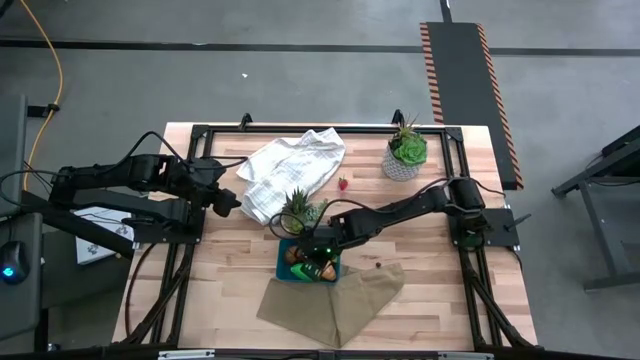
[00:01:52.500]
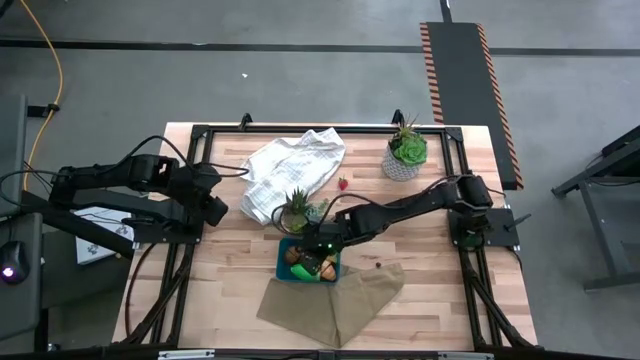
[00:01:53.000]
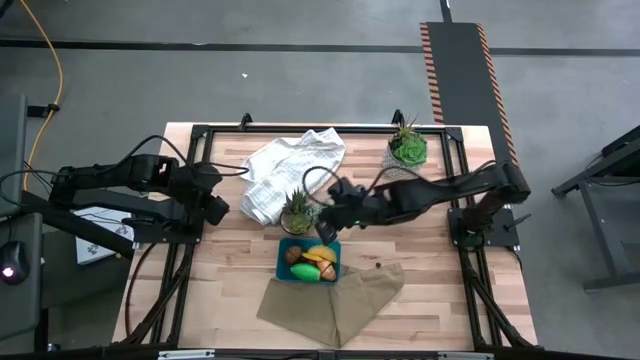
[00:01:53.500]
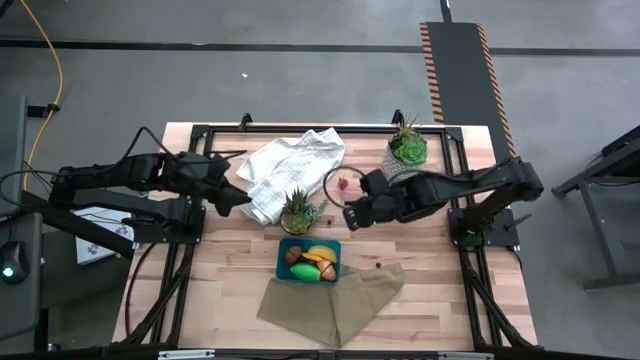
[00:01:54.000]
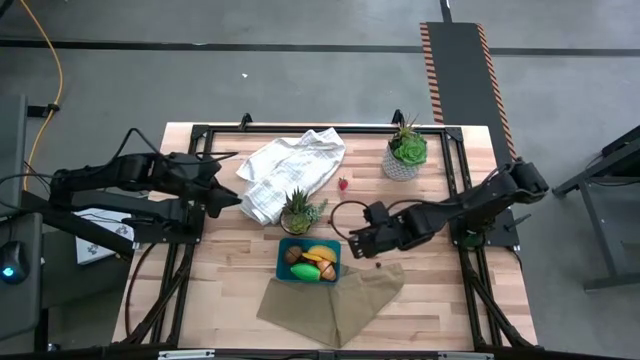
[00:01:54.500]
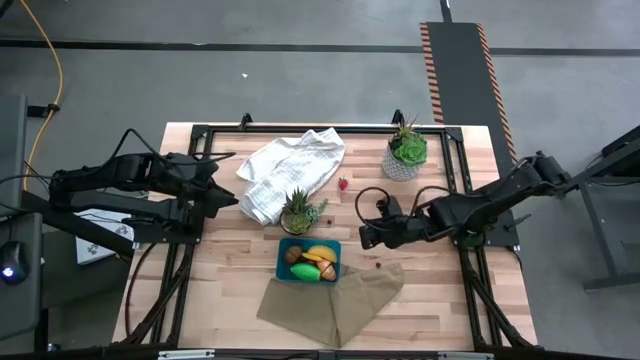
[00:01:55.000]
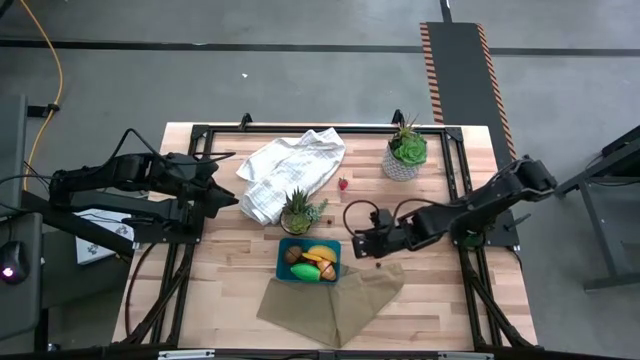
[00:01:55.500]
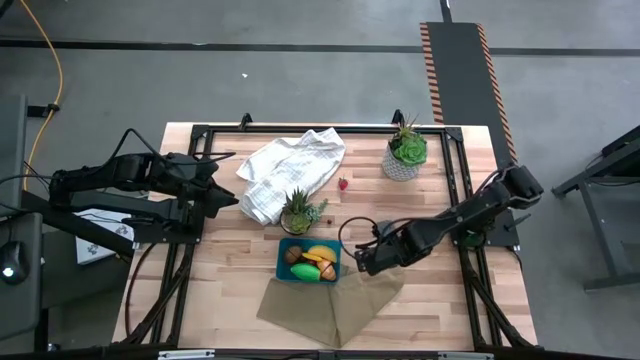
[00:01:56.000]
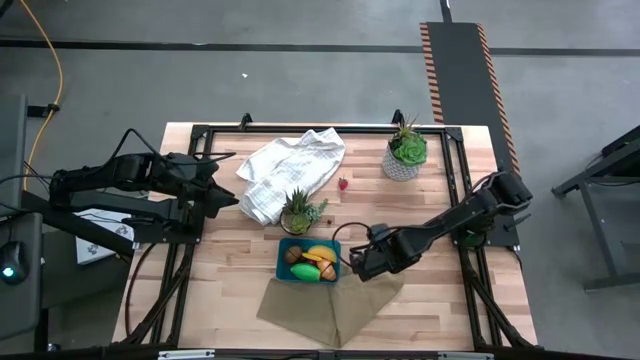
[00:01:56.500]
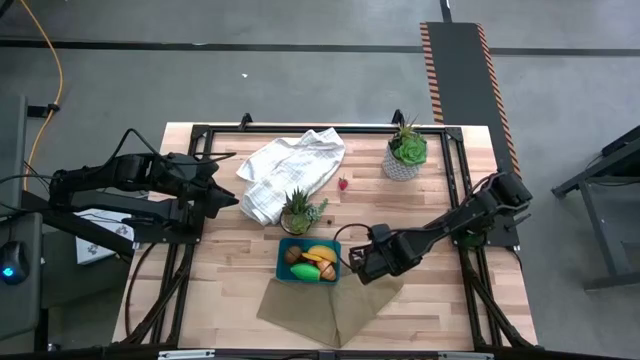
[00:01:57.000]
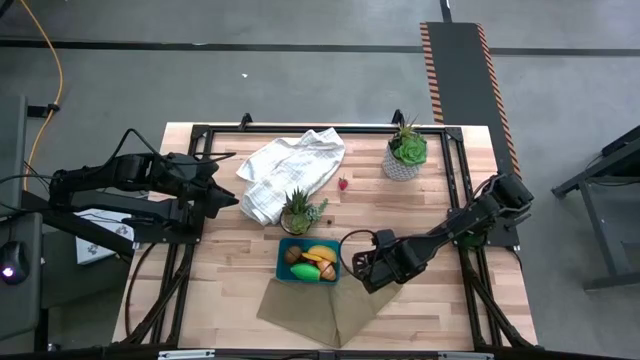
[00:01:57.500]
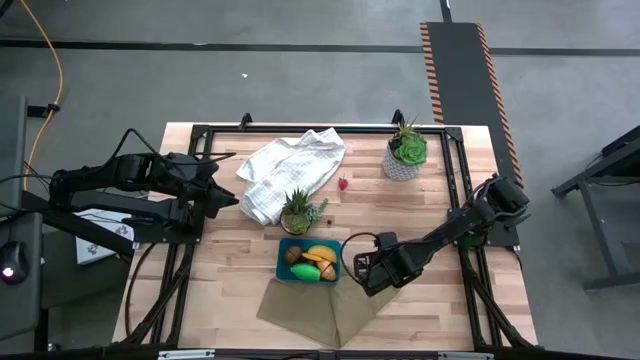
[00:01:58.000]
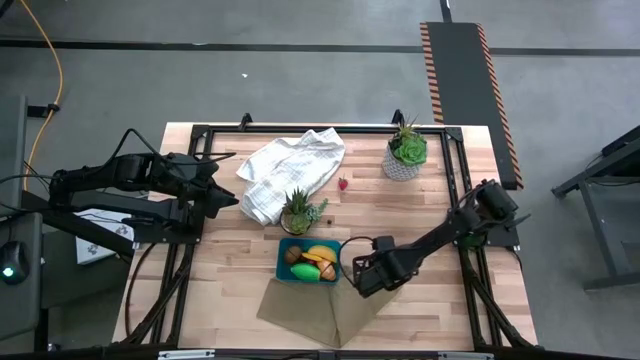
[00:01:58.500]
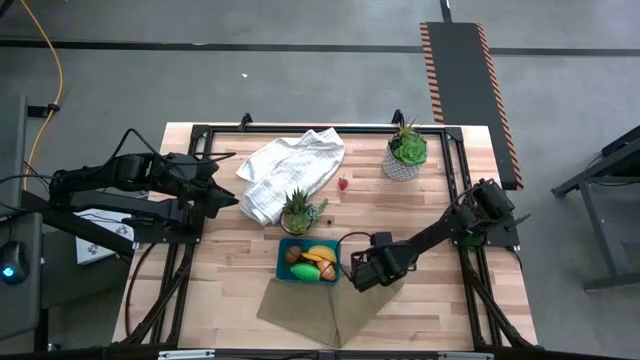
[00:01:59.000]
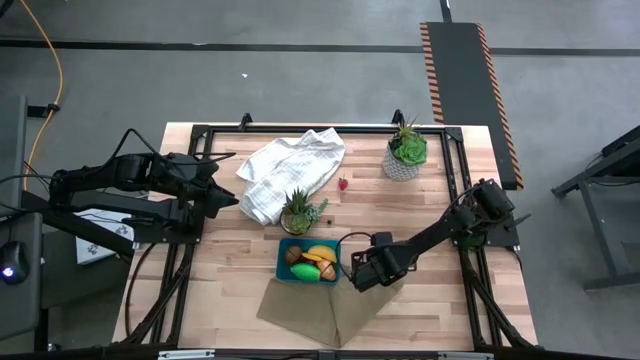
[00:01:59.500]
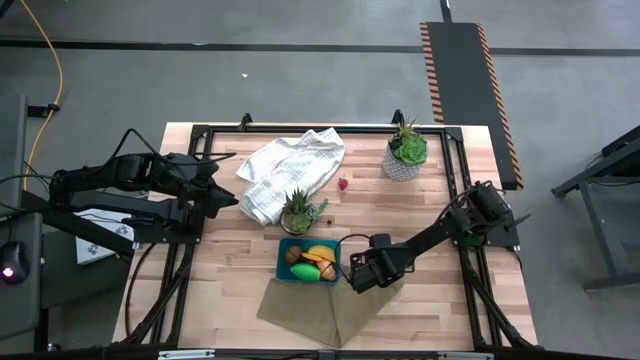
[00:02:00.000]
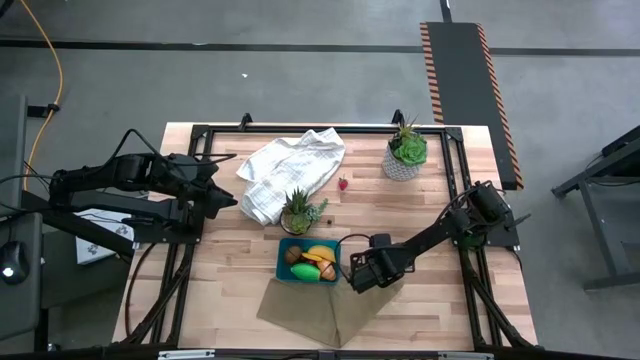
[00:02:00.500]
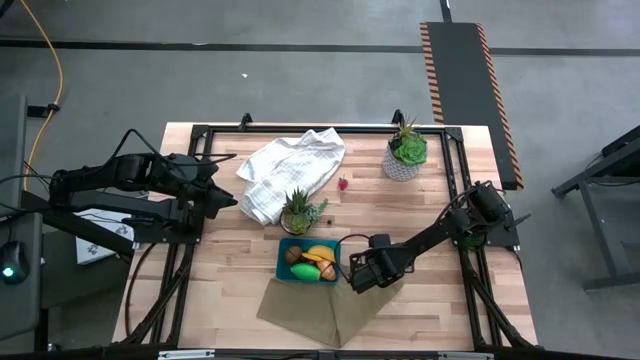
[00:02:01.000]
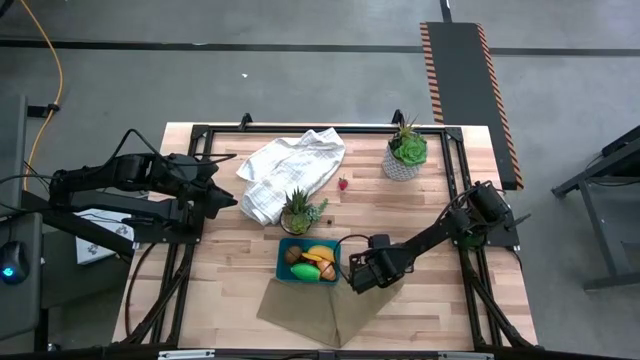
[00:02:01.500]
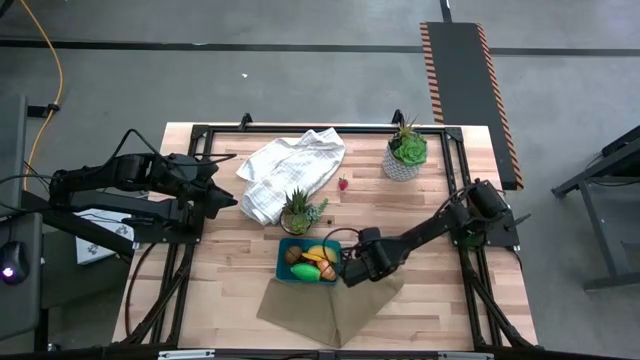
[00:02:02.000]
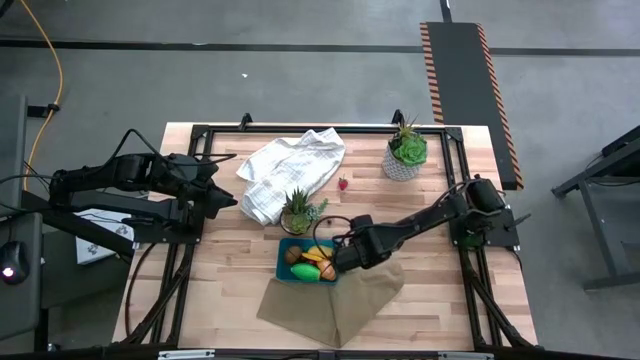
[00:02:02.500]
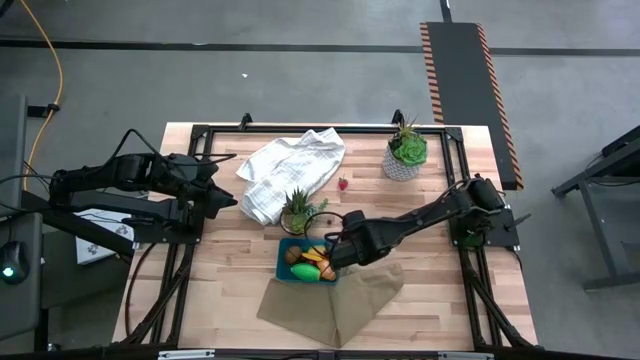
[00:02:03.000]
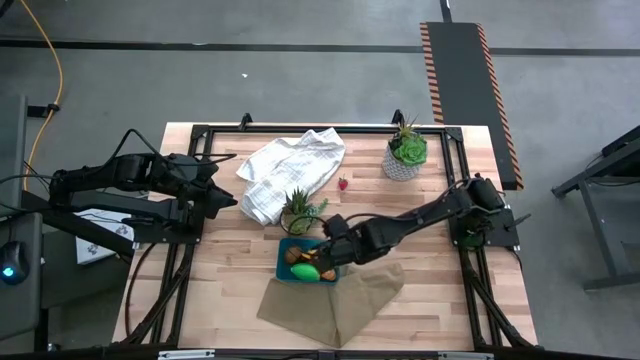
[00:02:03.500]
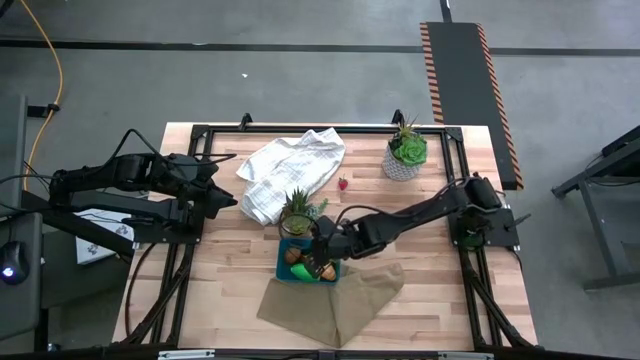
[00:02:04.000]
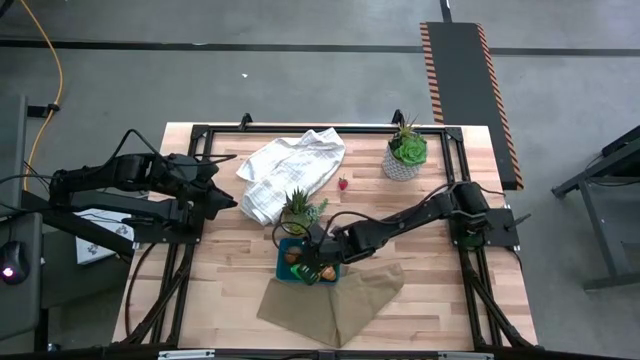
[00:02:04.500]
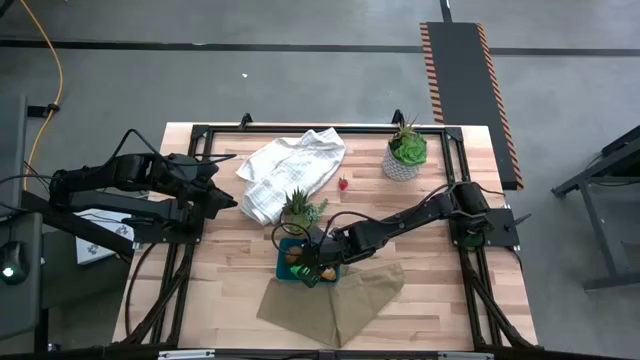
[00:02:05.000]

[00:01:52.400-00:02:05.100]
Task: Pick and placing Produce into tupperware
Put the bottom blueberry into the blue bin

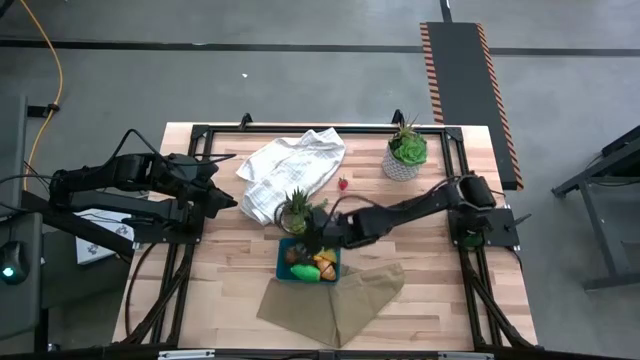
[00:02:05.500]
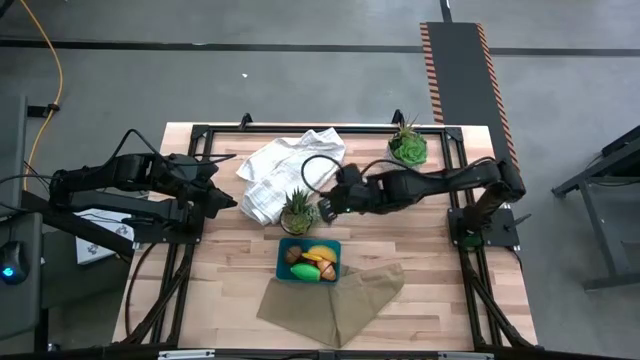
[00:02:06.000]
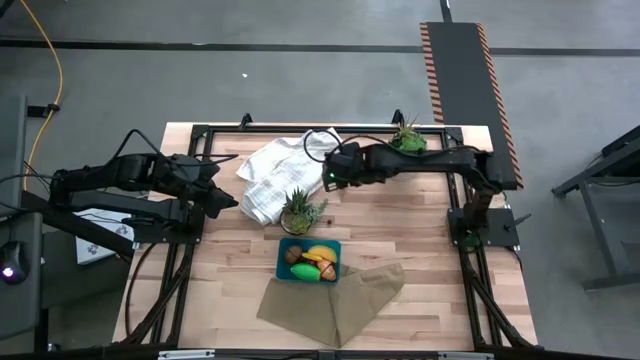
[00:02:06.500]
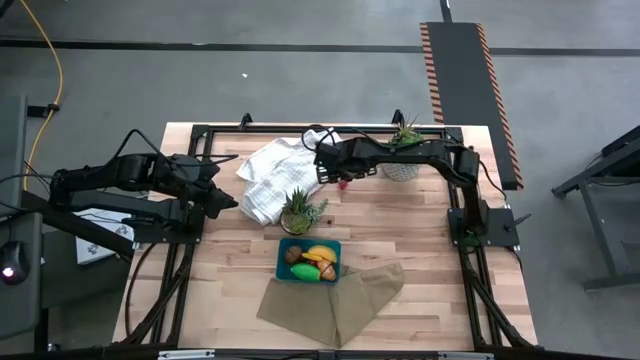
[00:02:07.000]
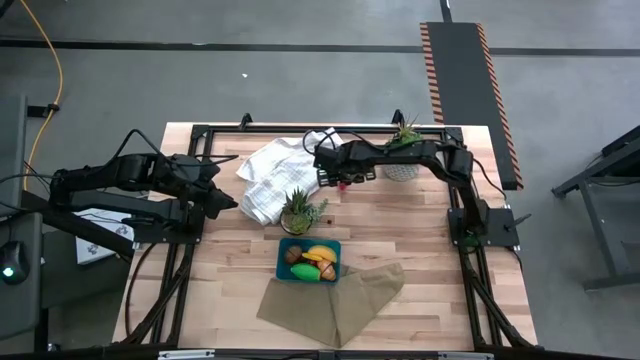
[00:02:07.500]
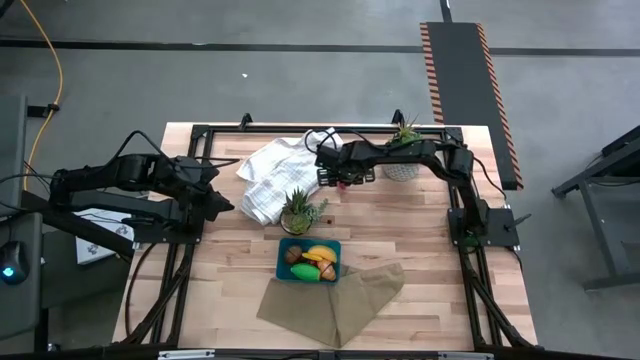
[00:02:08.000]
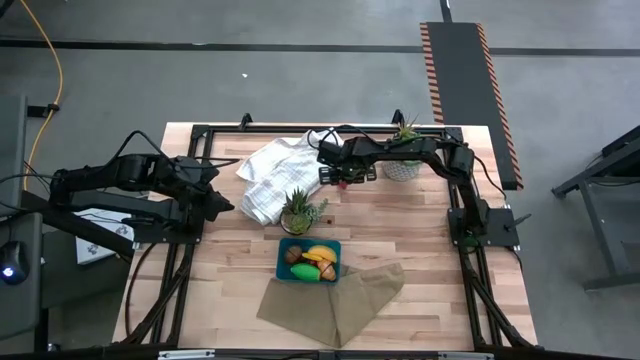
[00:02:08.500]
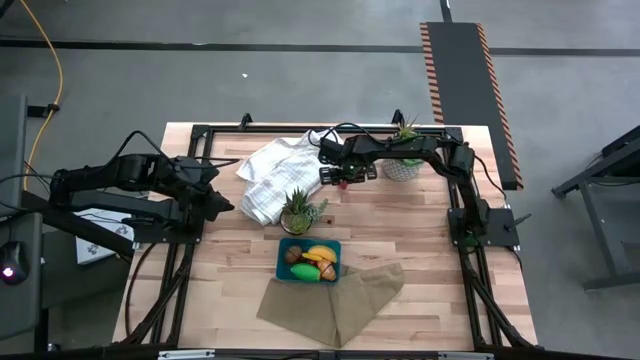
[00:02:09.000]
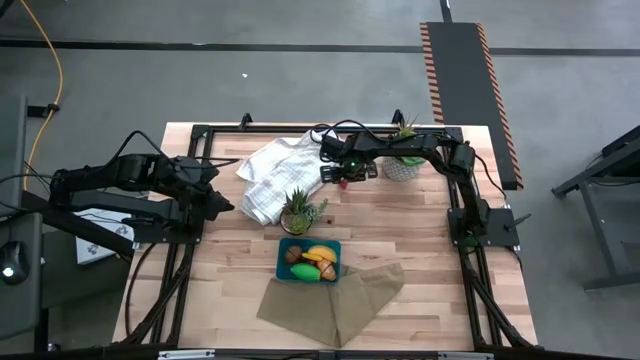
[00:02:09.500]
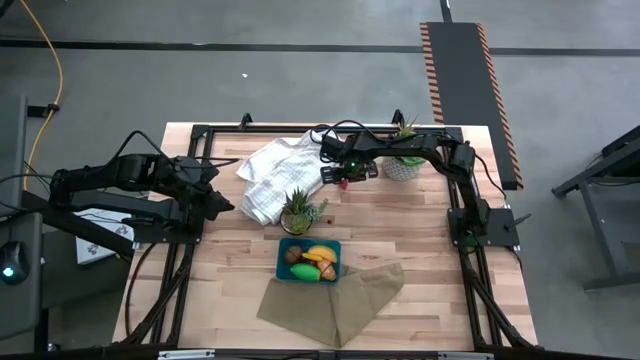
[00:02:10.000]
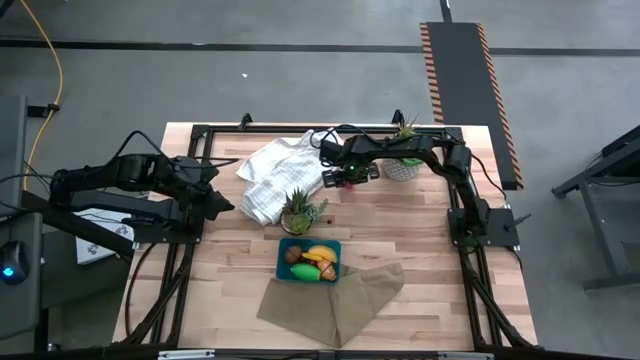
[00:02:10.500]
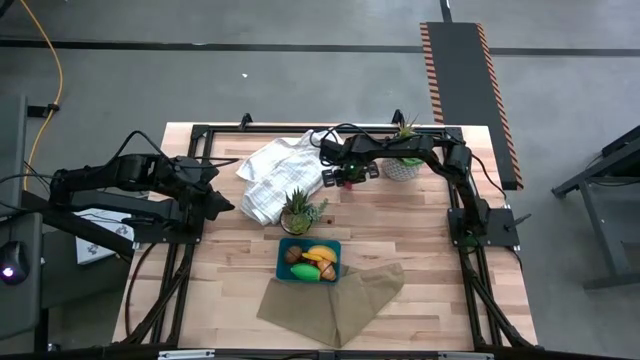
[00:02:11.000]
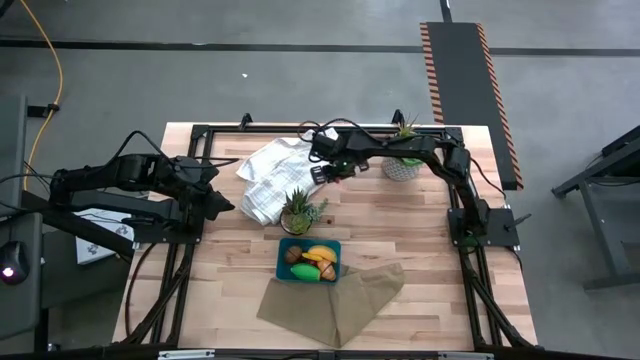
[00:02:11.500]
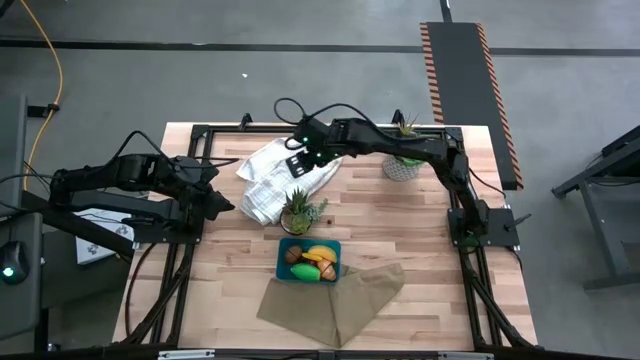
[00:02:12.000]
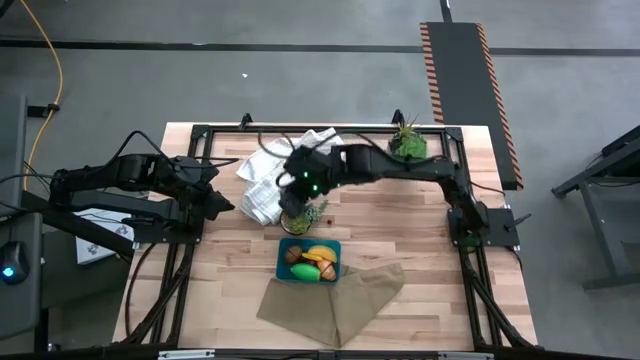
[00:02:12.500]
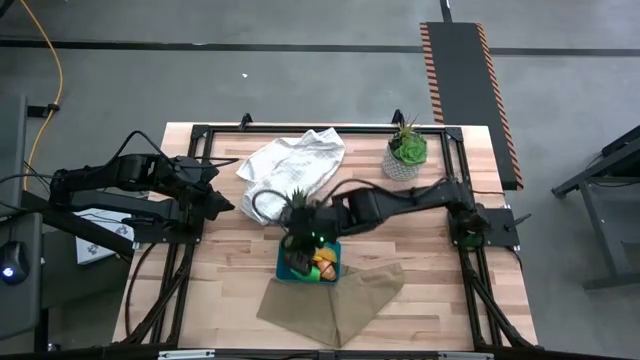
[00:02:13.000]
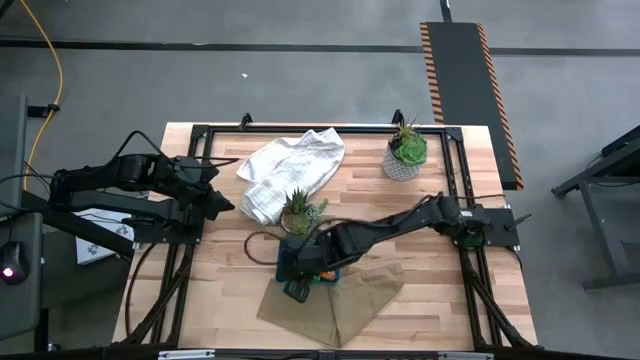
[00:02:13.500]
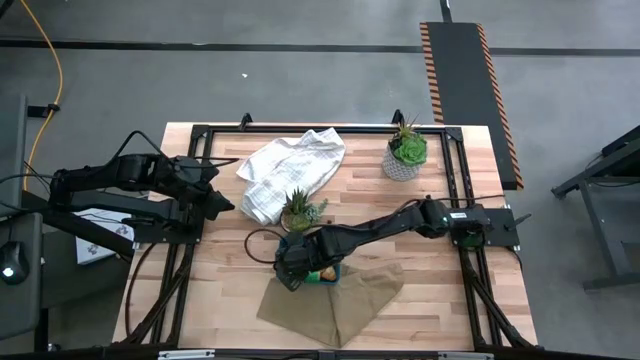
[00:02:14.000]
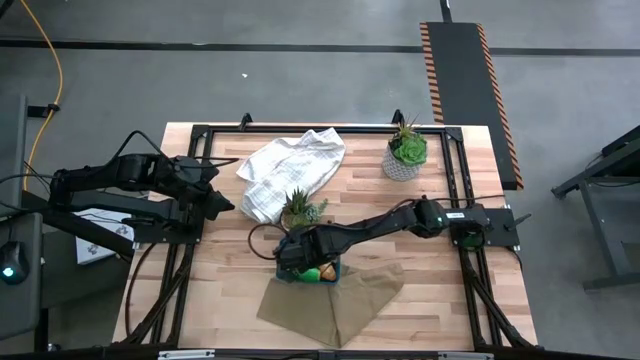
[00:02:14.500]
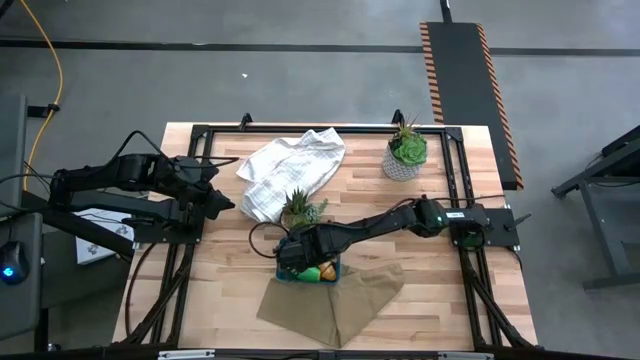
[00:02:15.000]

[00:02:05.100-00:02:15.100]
Put the strawberry into the blue bin
